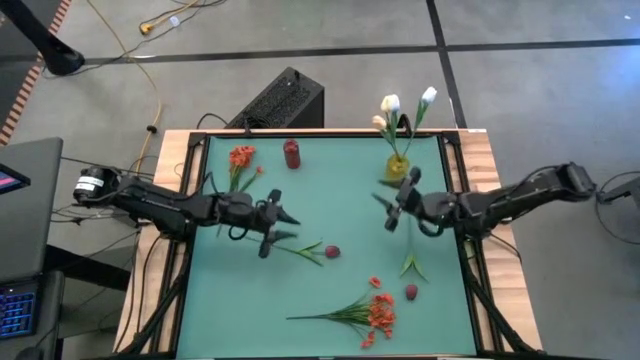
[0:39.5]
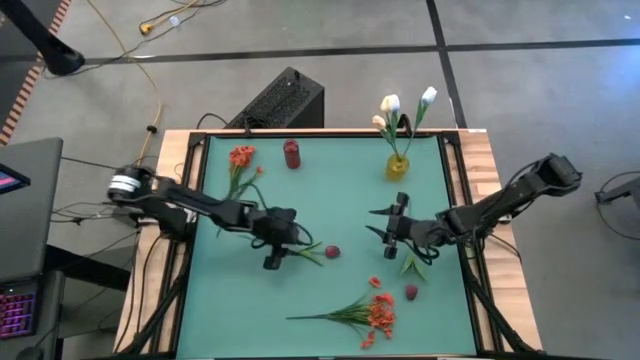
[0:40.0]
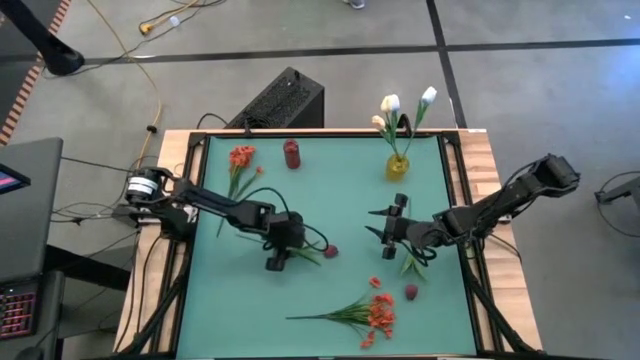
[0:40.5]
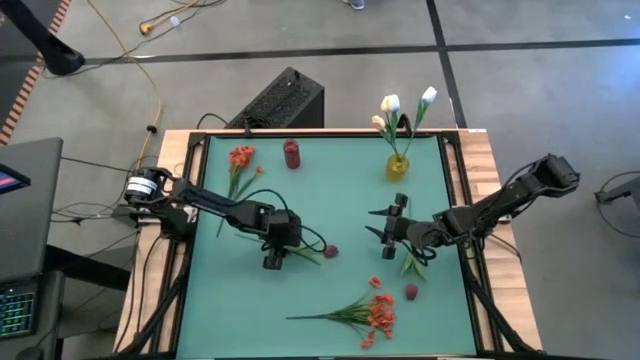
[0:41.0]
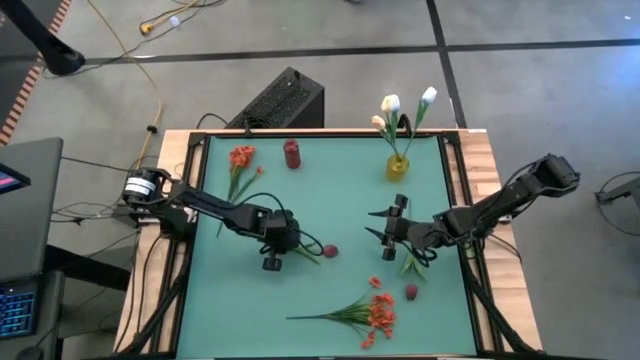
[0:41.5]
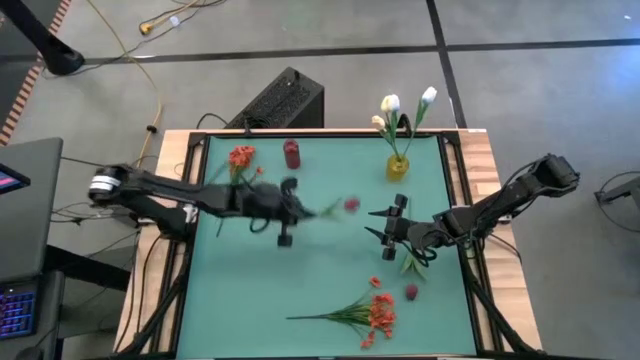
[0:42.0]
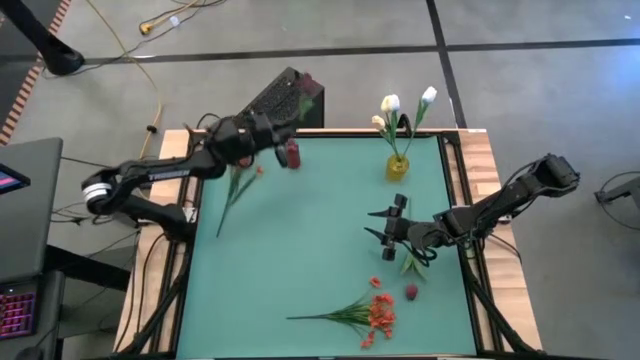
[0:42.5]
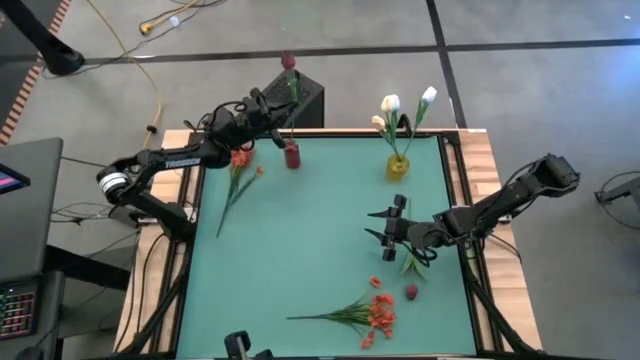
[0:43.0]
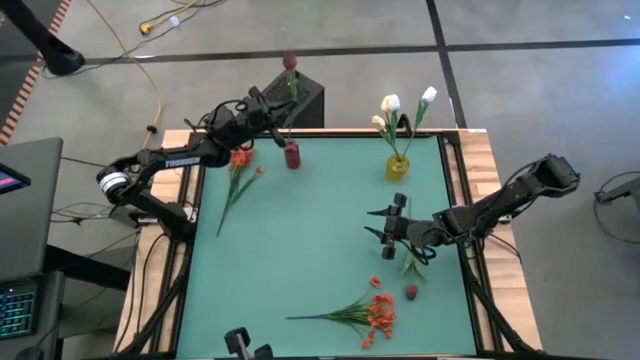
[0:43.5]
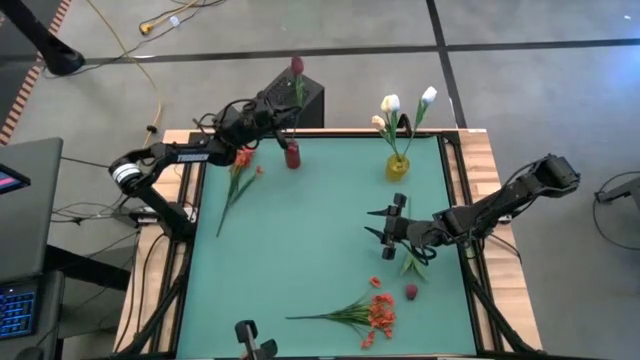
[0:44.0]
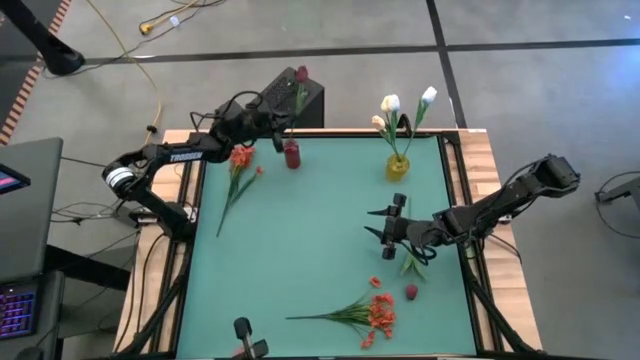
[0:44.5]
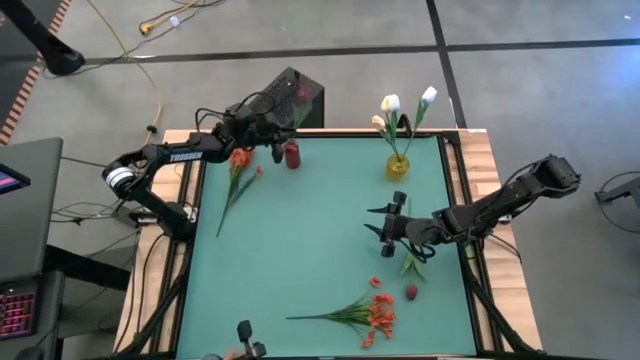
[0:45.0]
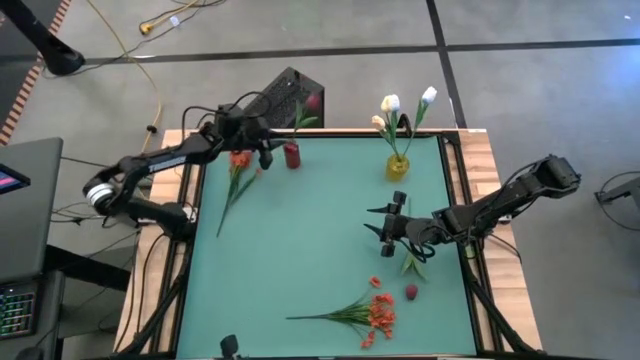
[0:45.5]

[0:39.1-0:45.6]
Task: Sort flowers into vase by color
Put the left red flower into the red vase

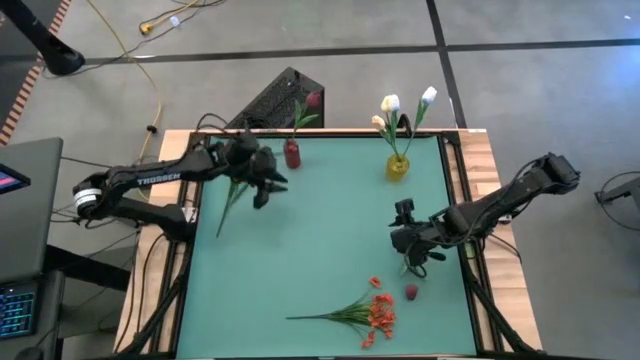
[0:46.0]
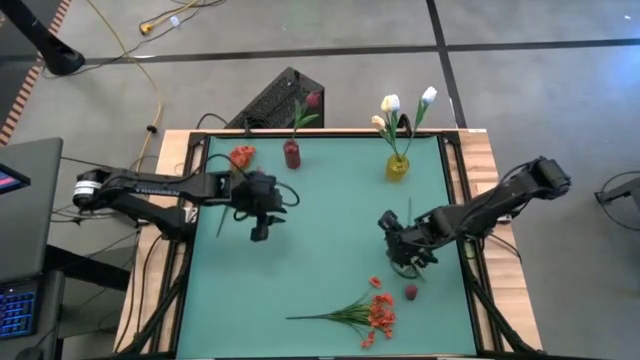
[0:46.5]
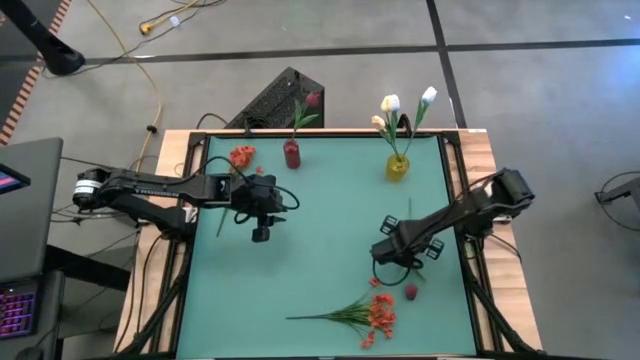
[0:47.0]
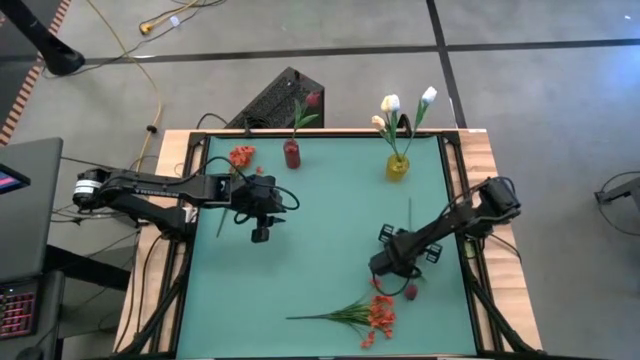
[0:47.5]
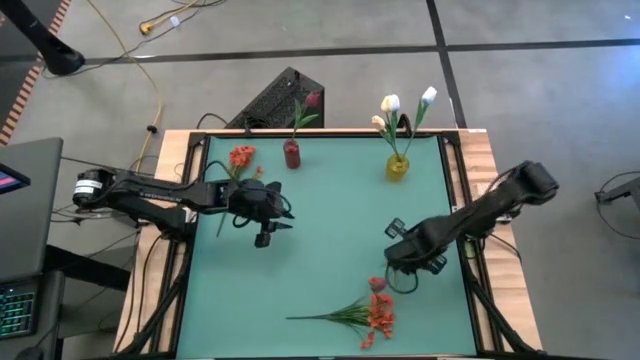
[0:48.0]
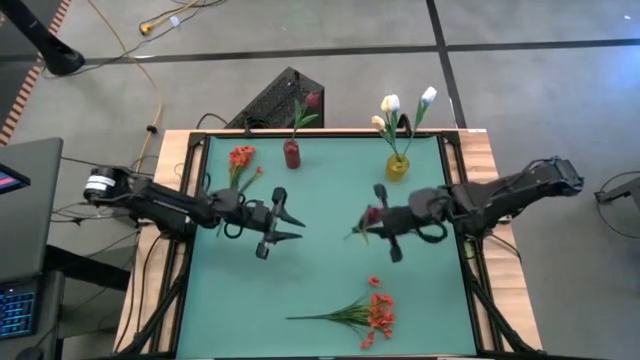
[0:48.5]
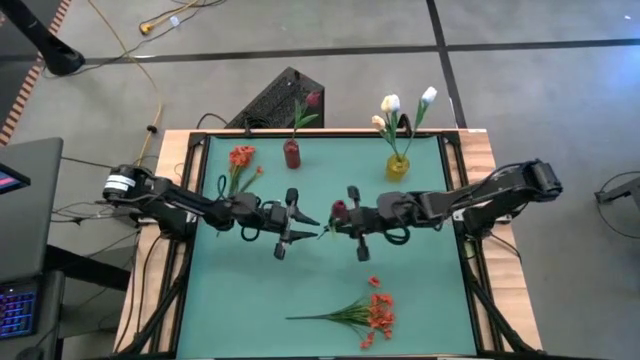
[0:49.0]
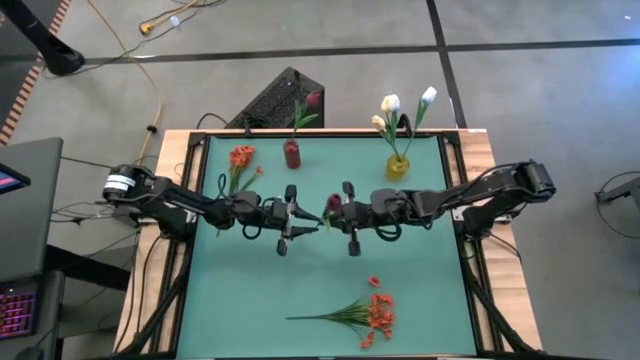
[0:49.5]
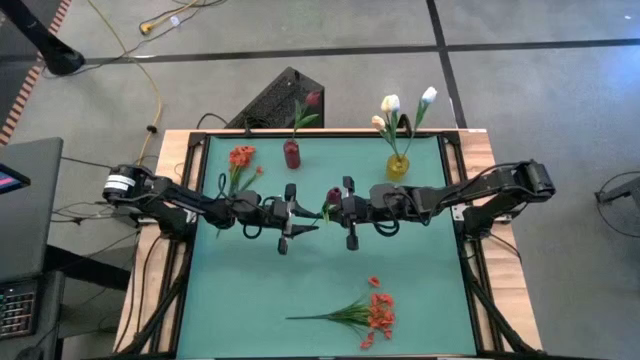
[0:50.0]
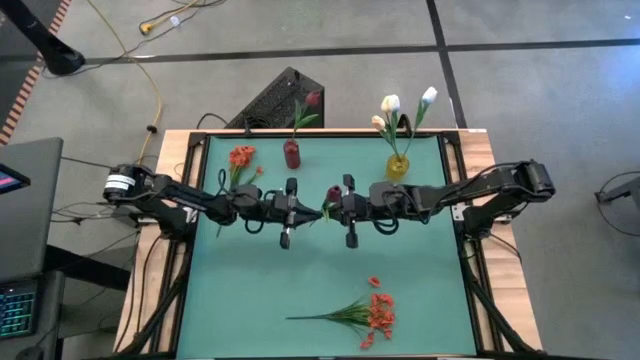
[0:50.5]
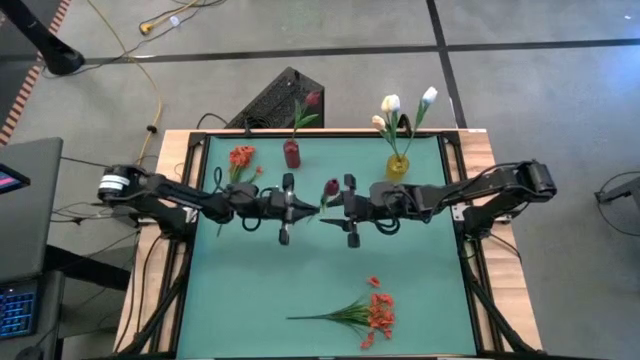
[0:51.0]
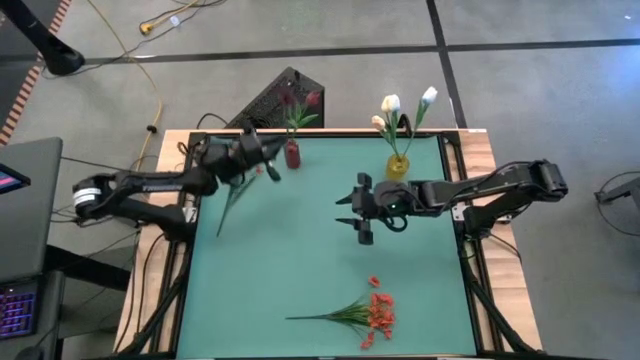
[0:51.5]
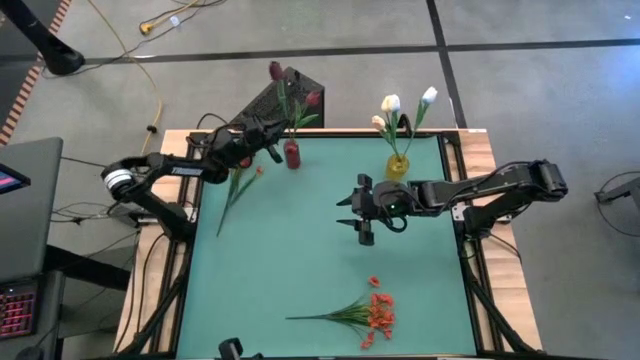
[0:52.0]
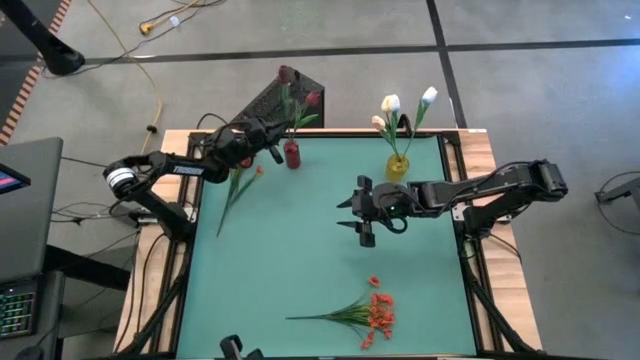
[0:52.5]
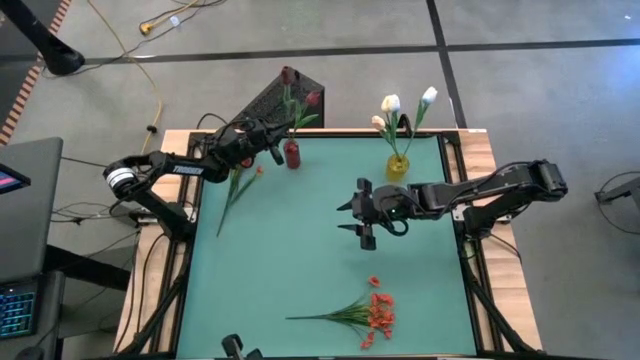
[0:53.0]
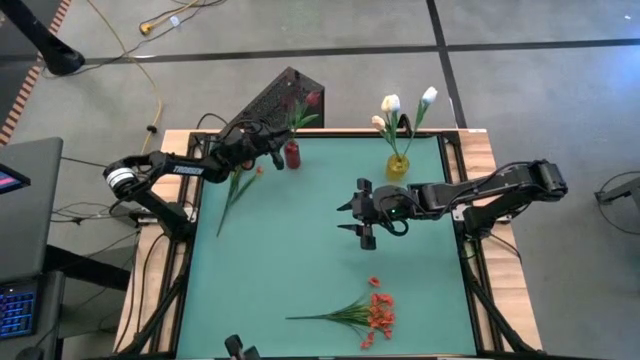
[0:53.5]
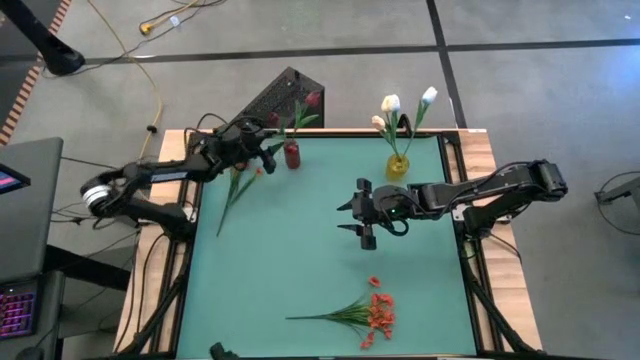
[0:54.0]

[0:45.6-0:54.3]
Put the red flower into the red vase

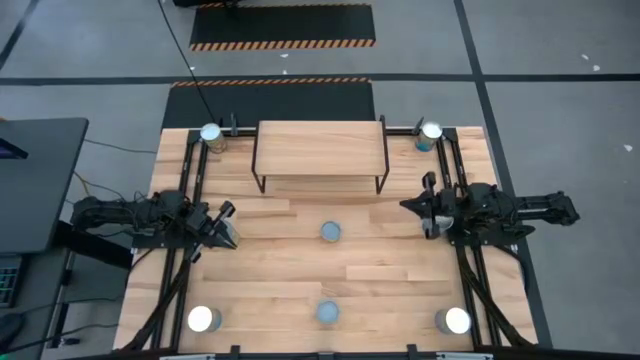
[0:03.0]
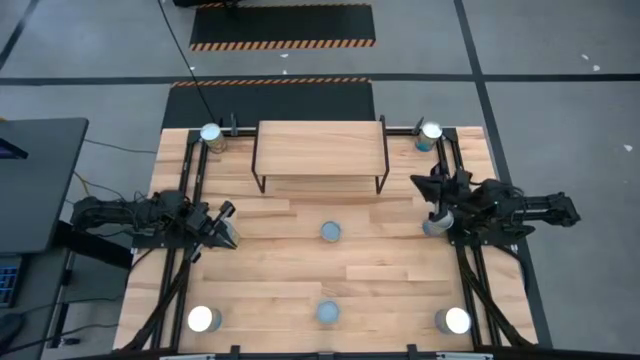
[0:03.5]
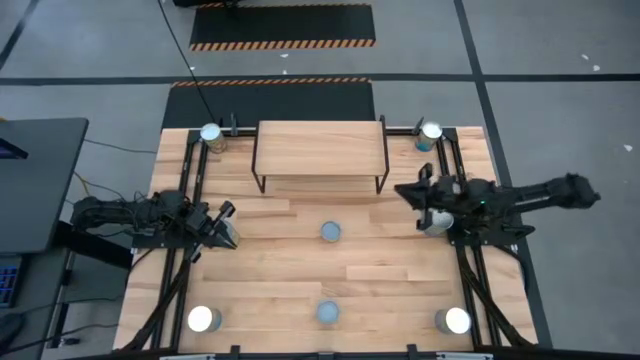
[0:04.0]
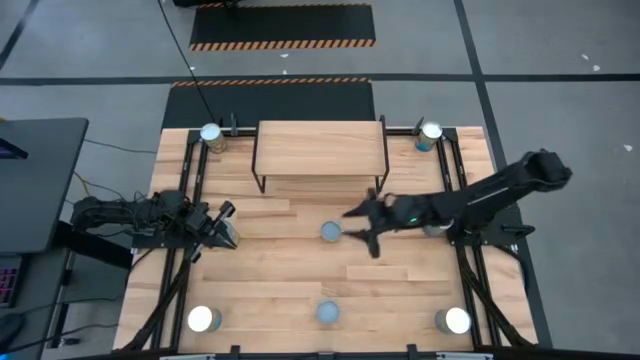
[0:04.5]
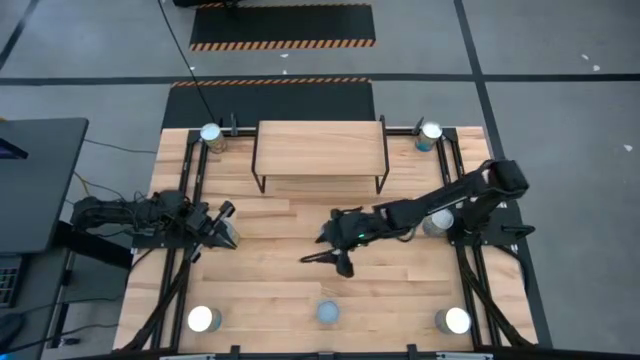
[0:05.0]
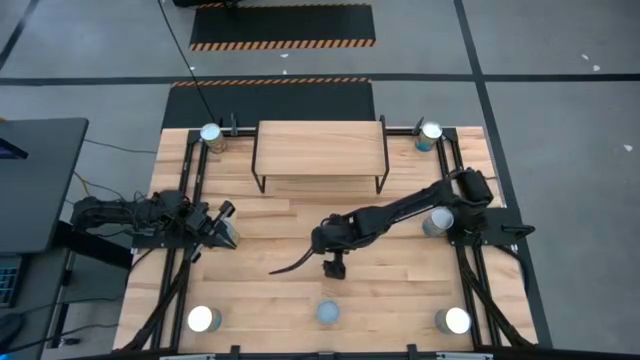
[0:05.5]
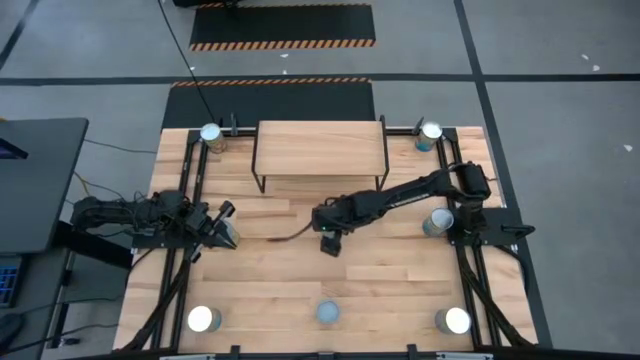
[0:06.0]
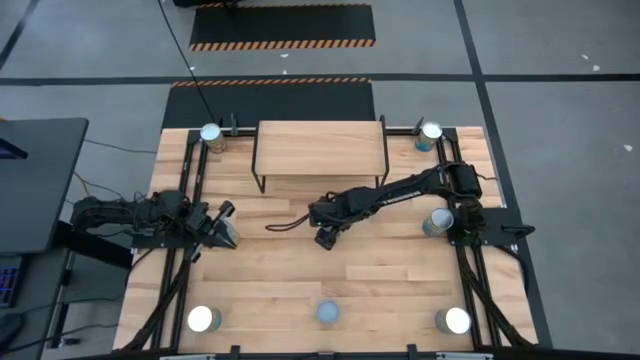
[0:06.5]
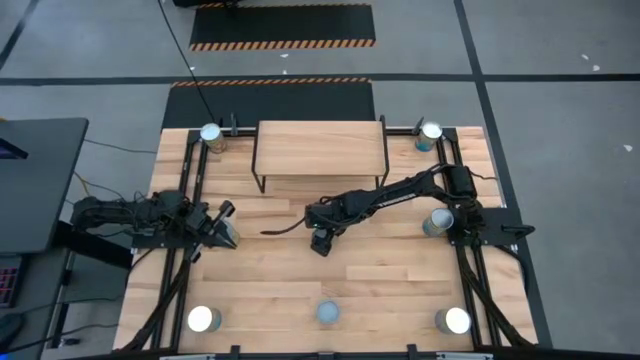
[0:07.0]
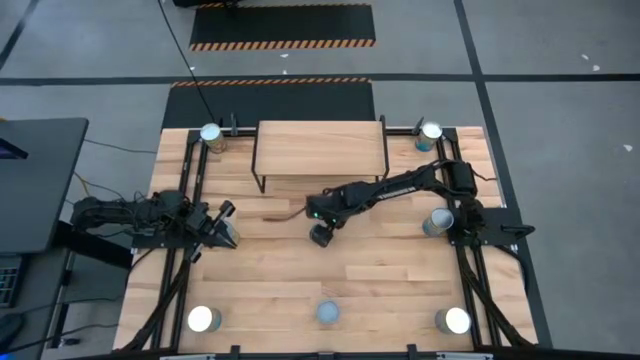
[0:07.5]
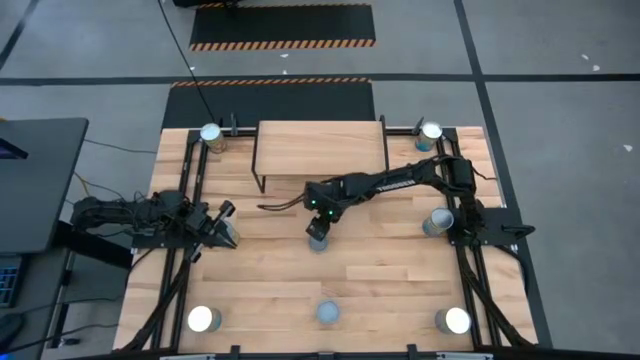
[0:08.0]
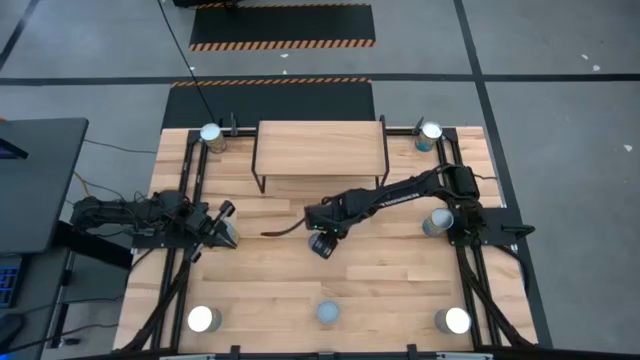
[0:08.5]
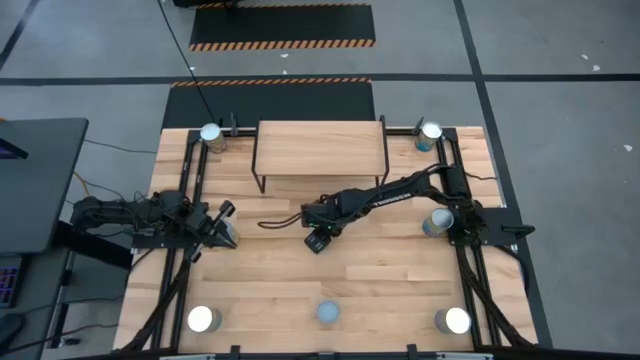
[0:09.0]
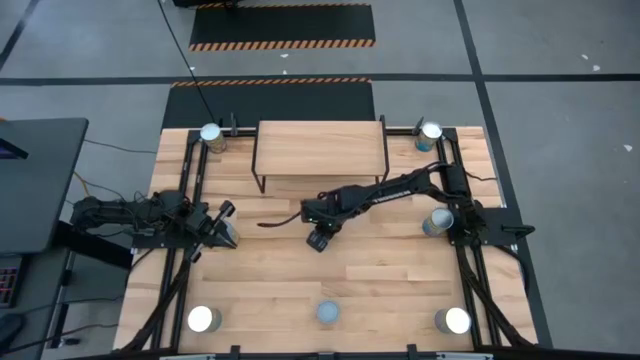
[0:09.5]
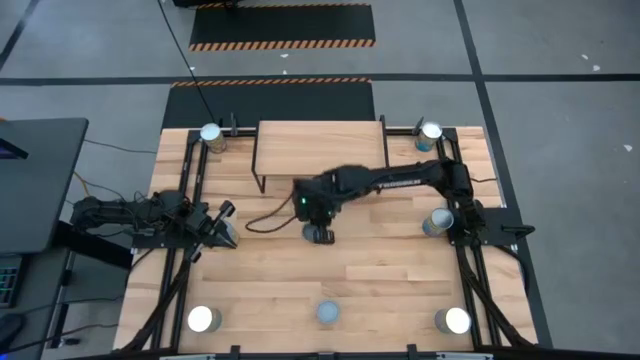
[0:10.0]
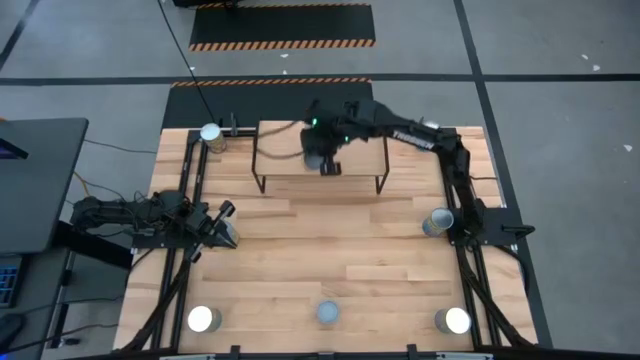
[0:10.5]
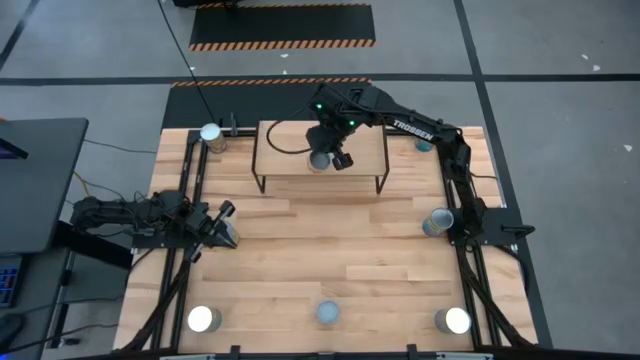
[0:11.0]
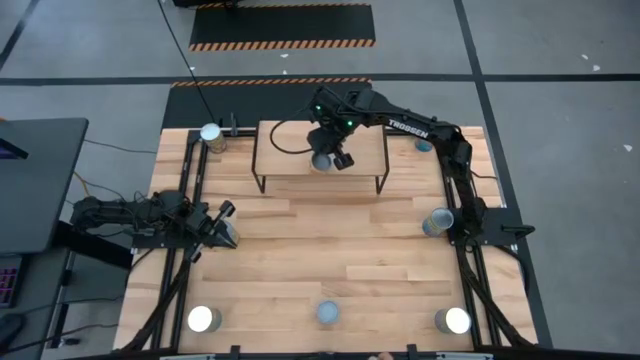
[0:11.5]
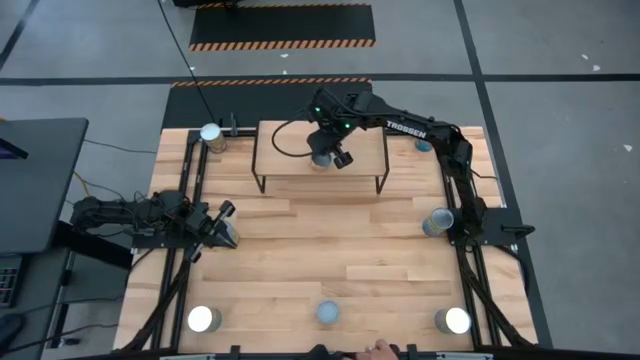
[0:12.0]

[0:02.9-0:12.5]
Task: Pick and place cans onto a shelf
Put the small yellow canned mushrooms on the shelf
